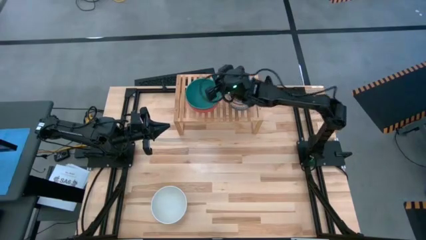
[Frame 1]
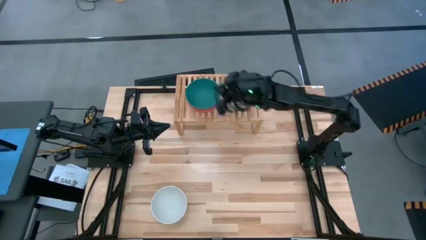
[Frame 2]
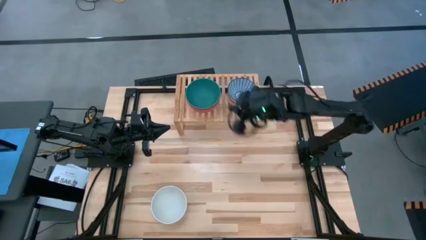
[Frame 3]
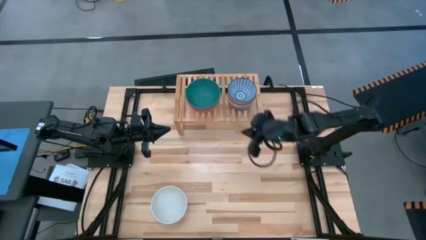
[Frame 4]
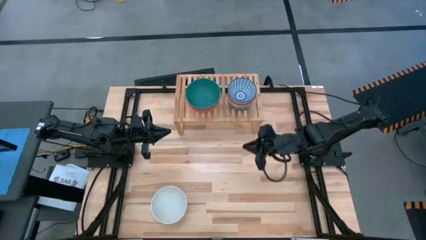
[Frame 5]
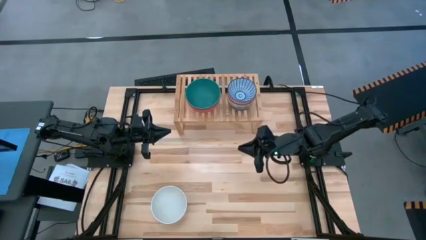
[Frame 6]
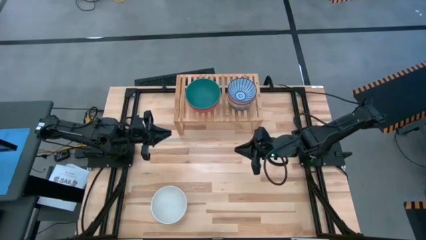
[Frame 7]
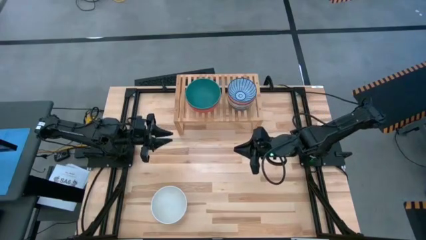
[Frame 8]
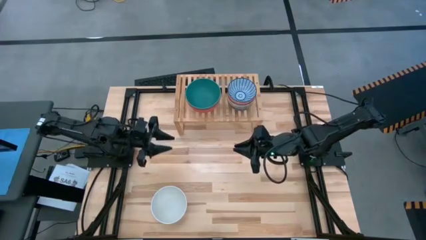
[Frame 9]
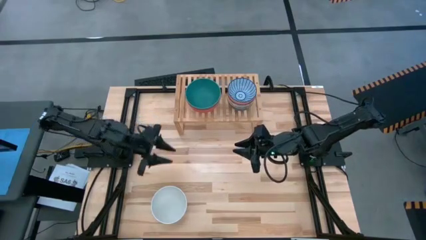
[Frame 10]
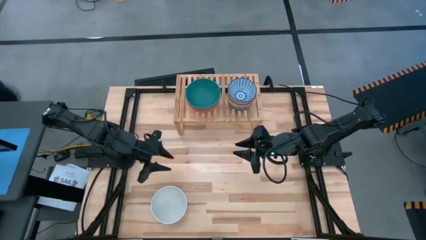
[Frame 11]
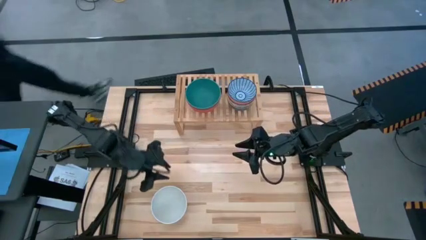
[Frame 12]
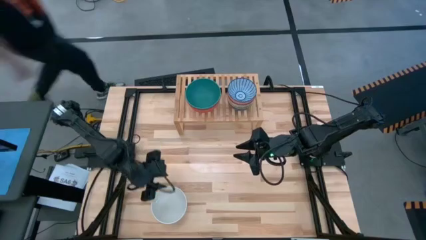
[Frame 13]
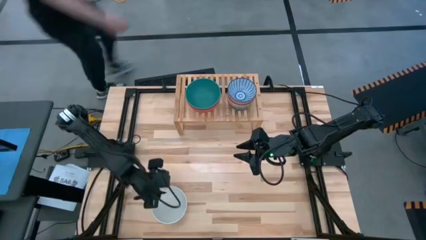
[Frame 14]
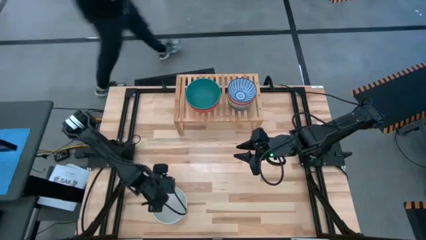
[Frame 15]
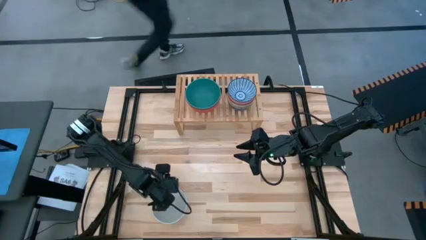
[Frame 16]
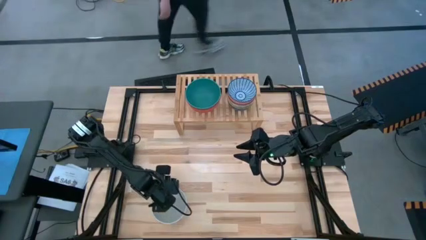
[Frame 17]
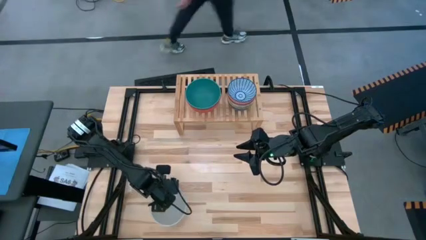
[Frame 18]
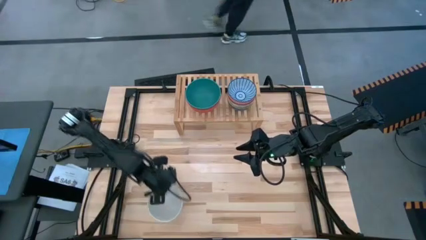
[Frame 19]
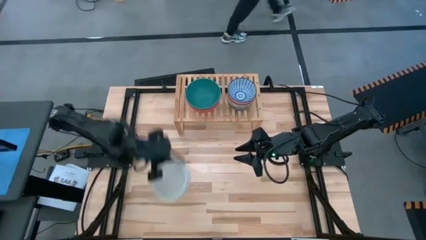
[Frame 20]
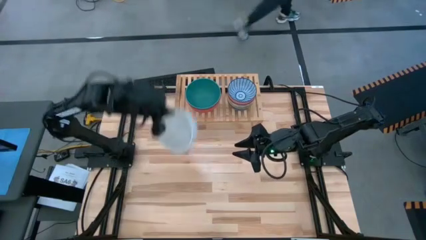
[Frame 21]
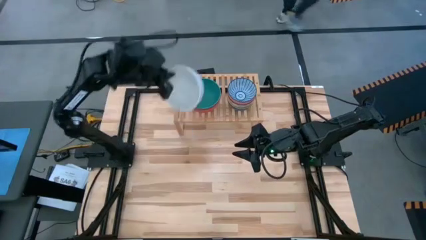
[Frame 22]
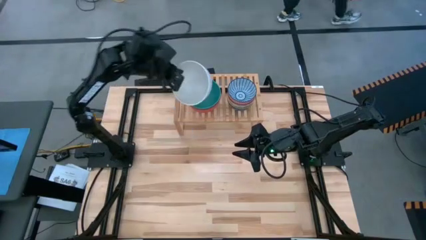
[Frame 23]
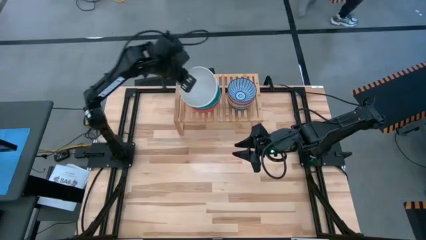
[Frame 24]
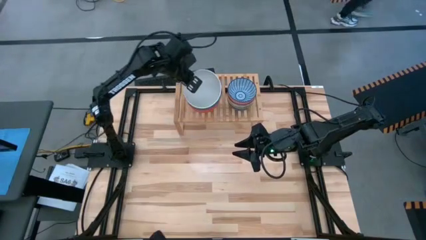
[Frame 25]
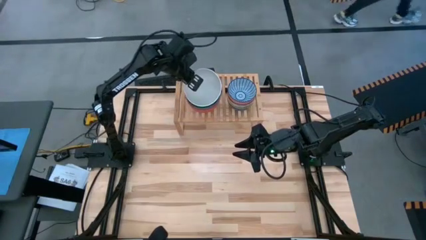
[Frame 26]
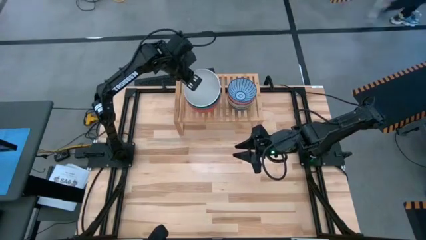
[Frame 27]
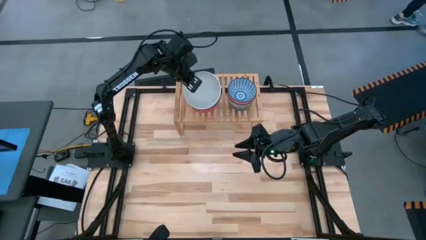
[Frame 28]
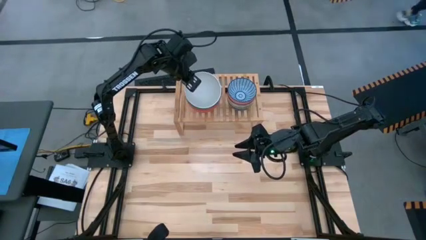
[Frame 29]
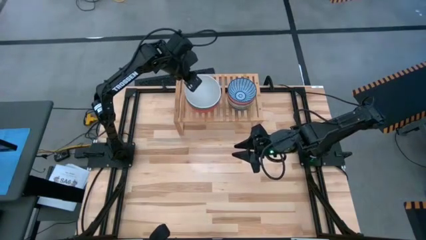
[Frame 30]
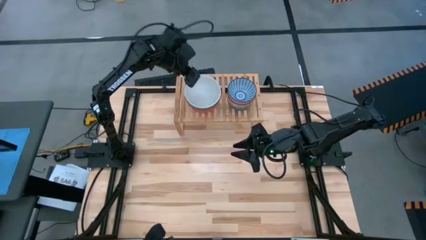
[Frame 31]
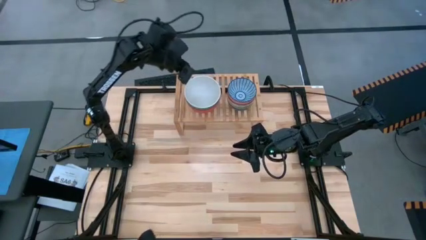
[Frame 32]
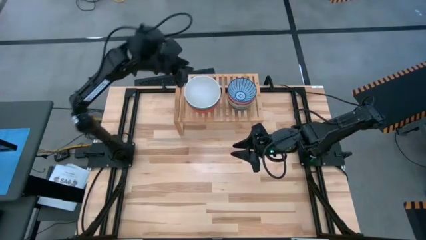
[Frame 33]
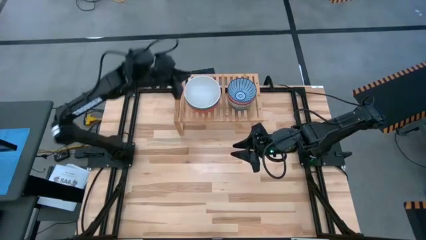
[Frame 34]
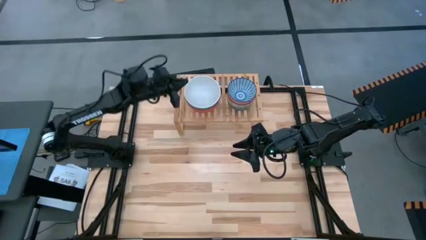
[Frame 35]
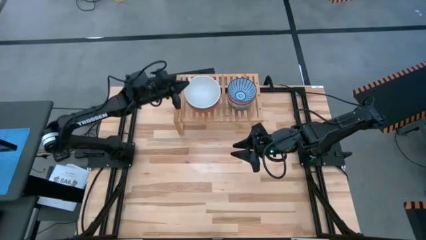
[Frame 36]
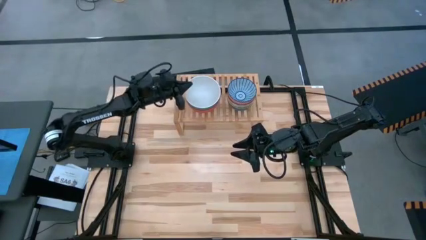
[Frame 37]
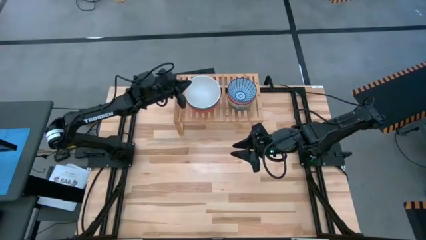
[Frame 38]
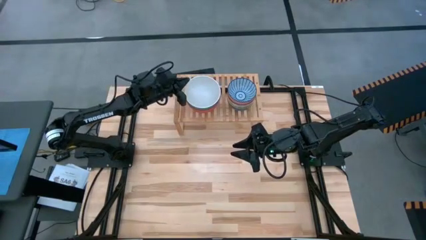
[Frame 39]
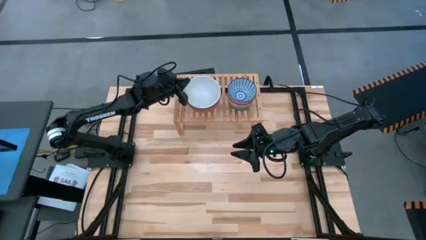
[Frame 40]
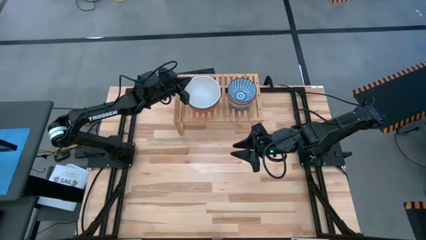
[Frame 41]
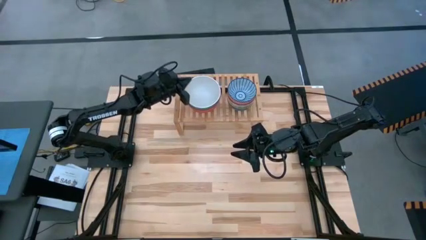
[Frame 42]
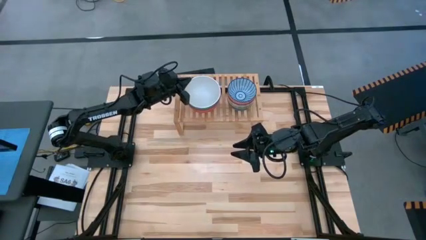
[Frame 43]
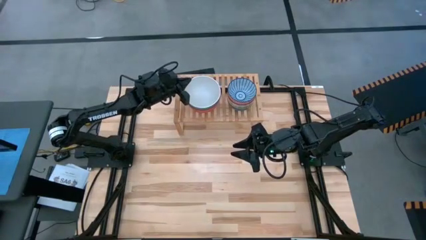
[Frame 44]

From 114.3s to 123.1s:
Task: Place and stack bowls onto a shelf
Stack the big white bowl on top of the other big dark blue bowl on the shelf

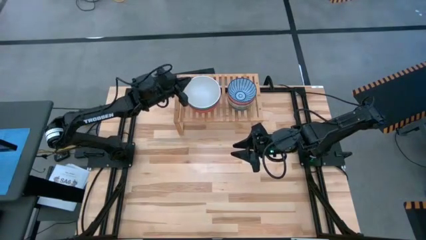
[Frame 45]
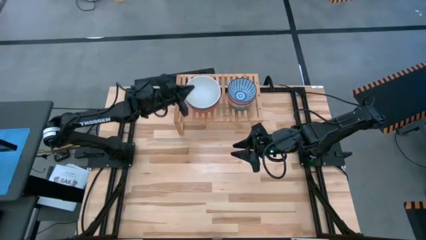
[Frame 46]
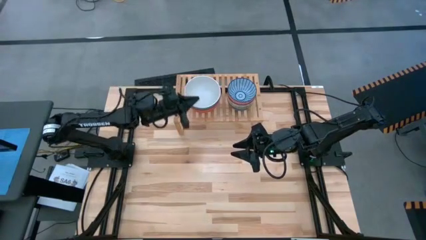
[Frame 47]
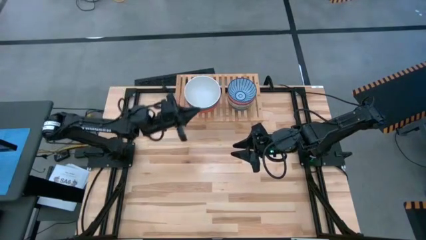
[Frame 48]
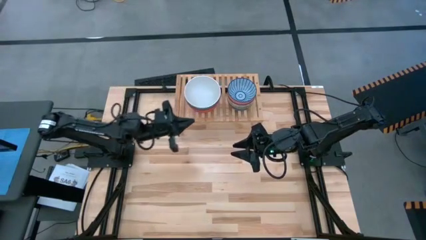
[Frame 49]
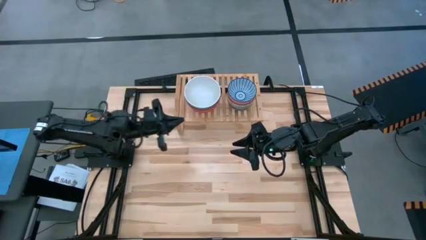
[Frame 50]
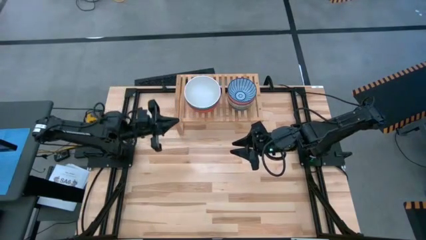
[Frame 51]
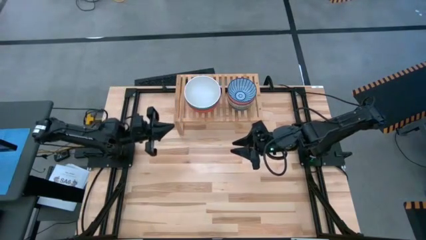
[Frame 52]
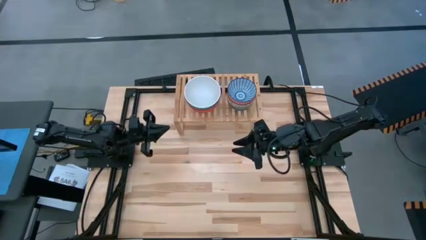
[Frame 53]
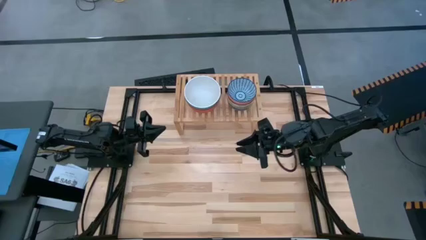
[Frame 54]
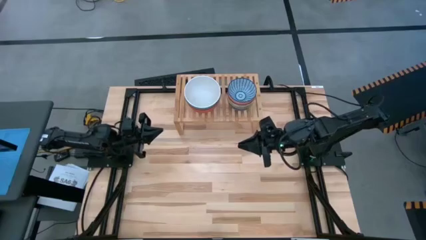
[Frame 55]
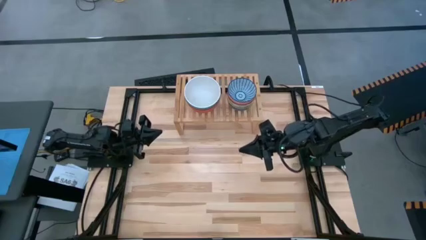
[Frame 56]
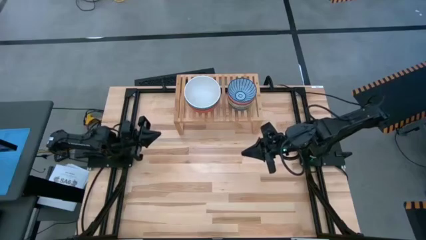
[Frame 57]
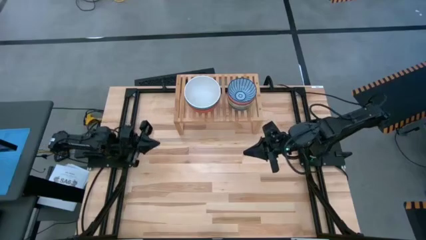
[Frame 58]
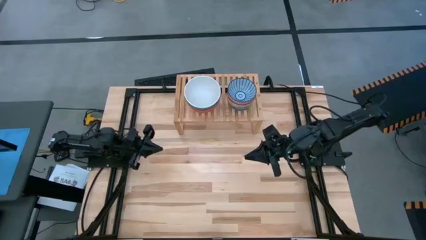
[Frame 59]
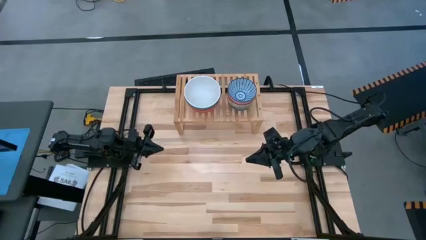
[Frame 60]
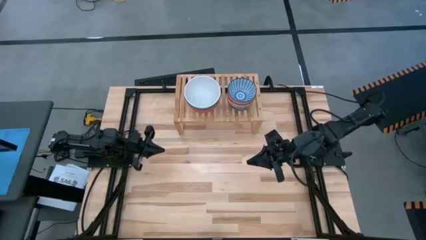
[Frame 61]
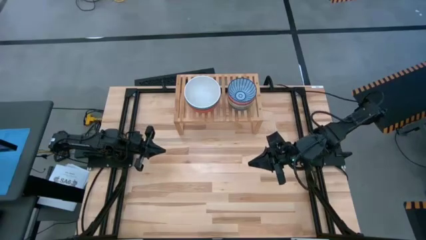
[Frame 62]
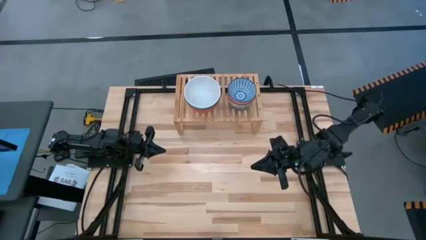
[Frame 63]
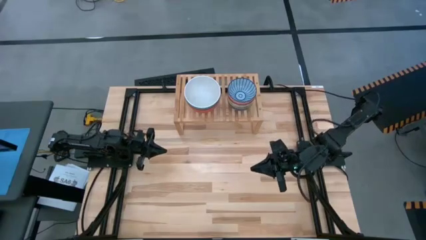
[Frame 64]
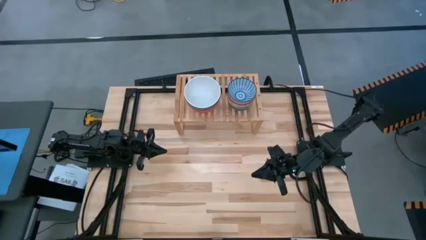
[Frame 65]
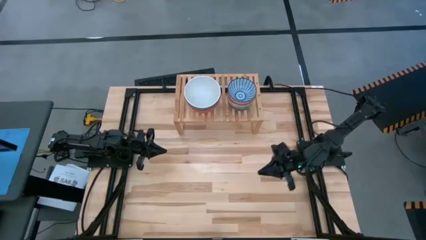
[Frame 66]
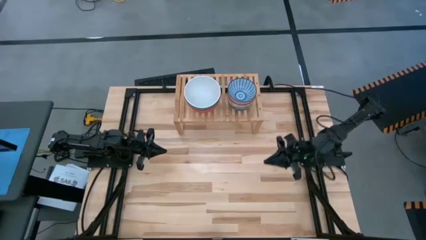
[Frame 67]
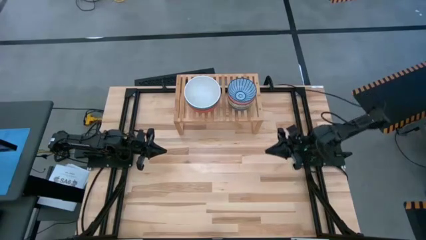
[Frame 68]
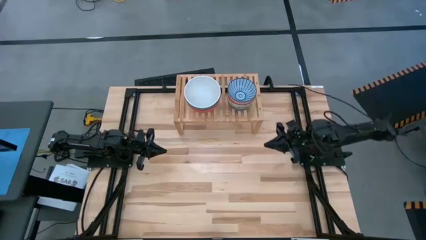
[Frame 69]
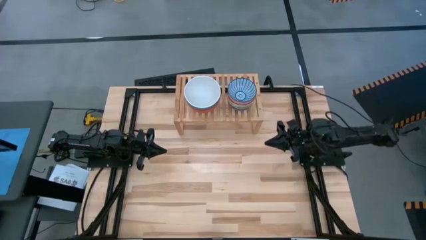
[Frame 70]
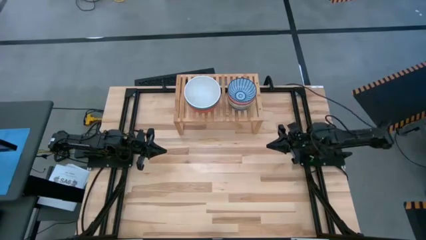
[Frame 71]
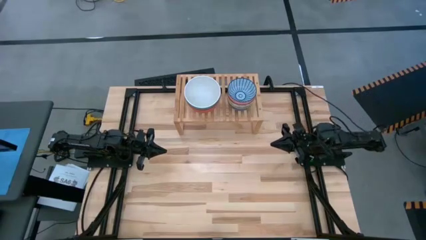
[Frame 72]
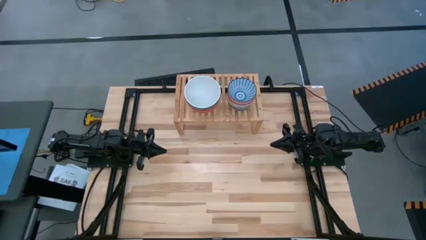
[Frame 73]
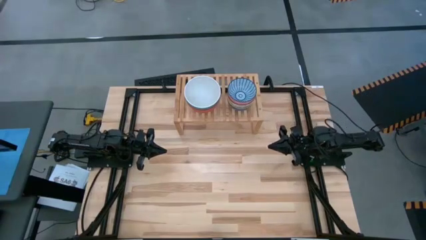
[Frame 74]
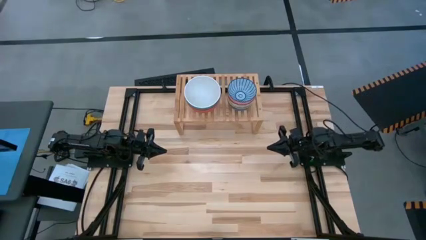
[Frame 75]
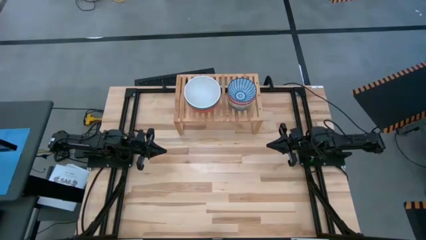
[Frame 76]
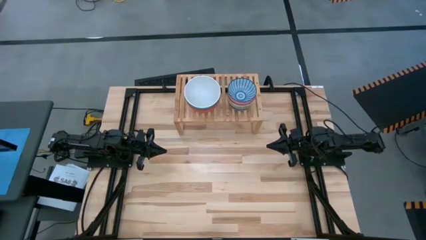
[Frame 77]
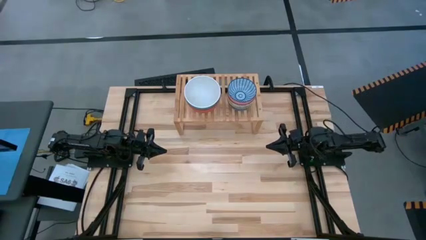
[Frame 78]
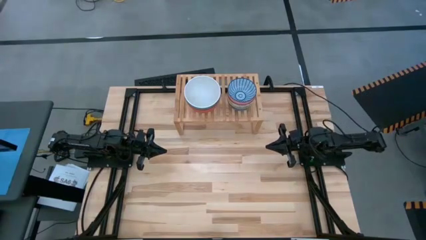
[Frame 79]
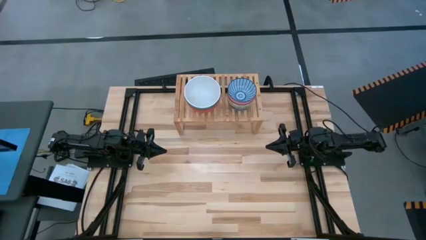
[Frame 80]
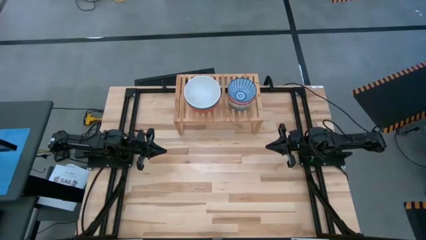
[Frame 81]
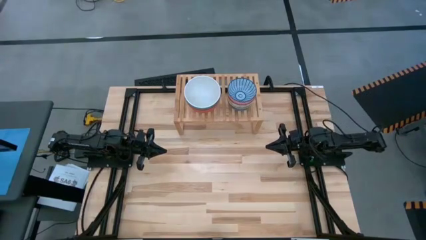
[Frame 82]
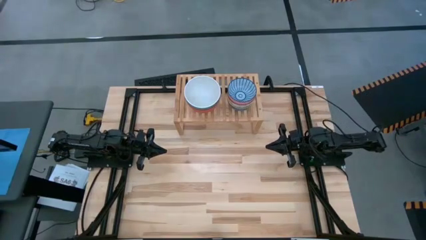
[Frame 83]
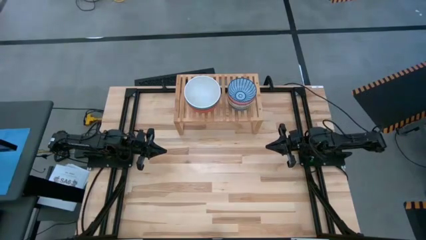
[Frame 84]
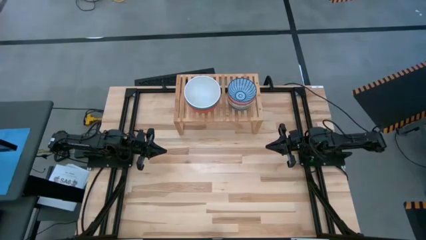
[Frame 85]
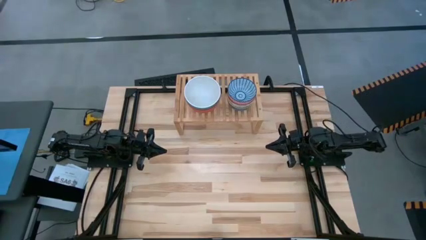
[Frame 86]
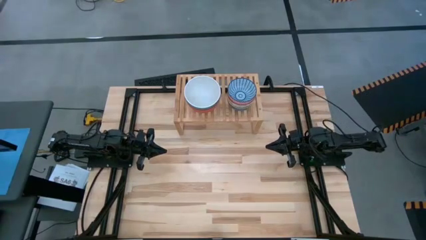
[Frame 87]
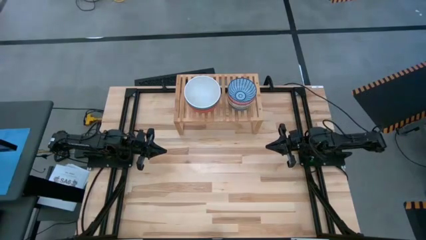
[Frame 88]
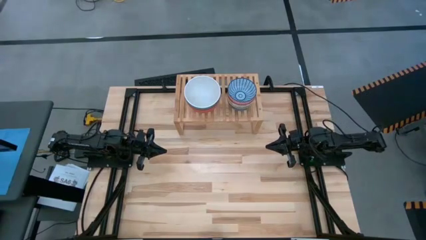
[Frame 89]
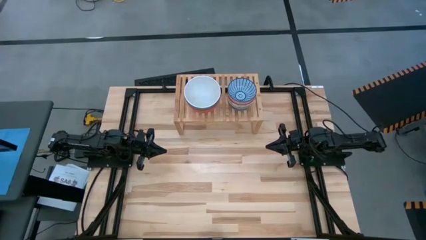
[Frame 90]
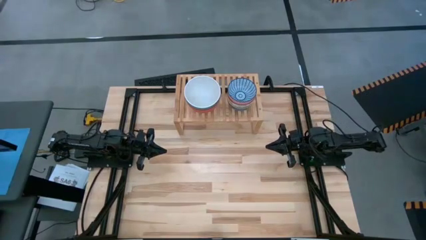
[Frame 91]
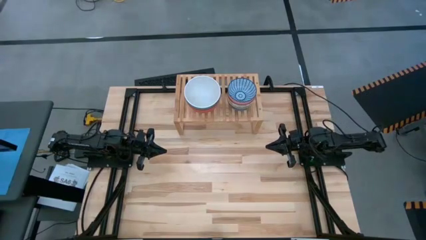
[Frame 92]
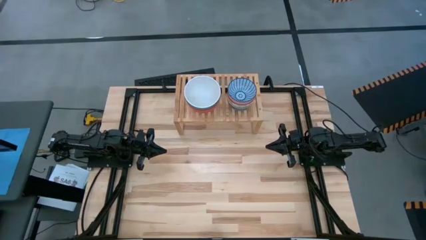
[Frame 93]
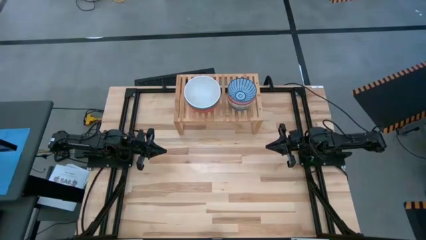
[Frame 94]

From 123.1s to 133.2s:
Return to Home Position
